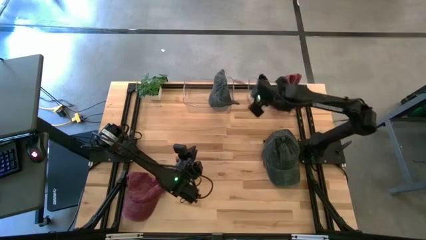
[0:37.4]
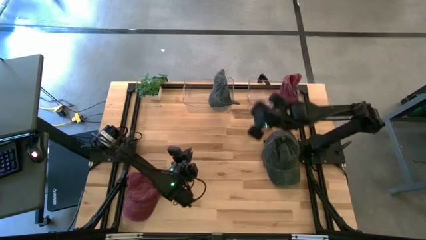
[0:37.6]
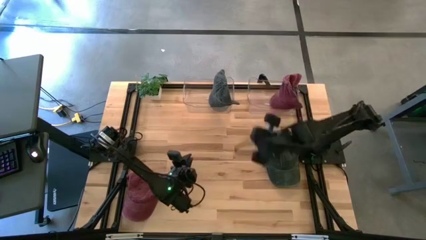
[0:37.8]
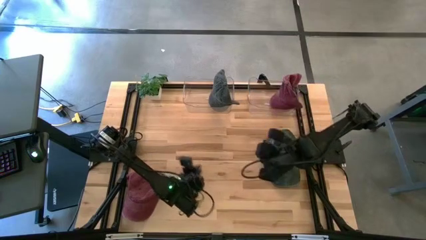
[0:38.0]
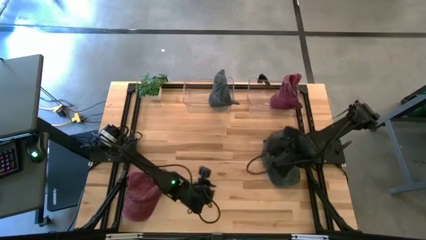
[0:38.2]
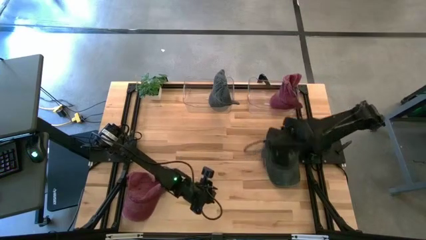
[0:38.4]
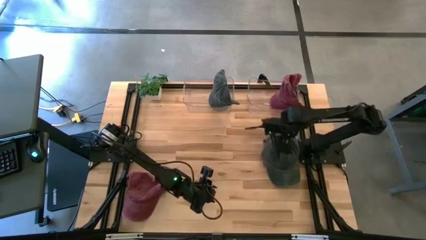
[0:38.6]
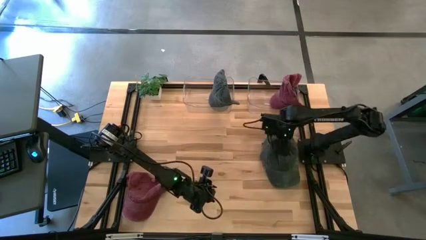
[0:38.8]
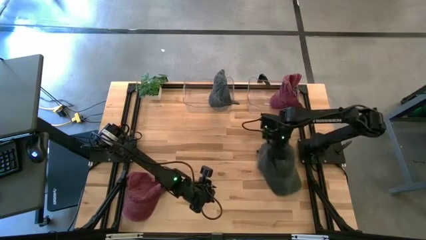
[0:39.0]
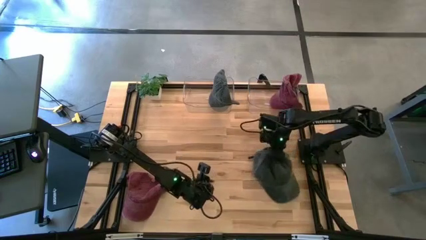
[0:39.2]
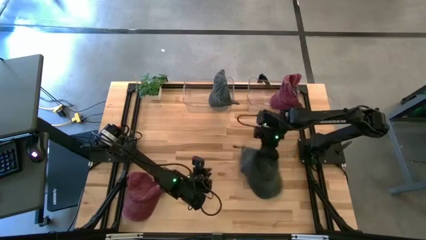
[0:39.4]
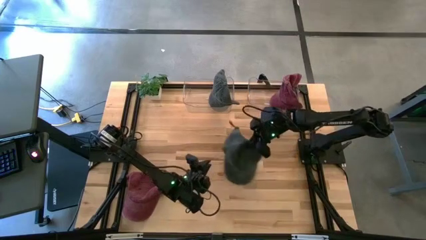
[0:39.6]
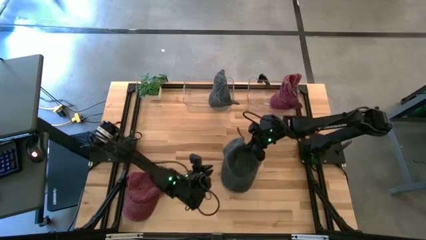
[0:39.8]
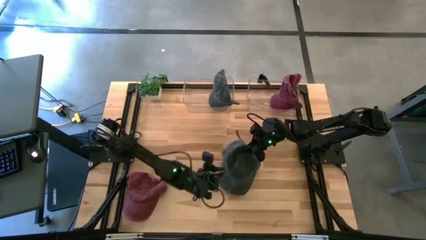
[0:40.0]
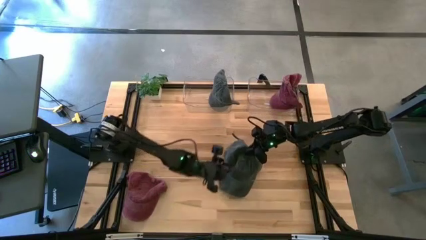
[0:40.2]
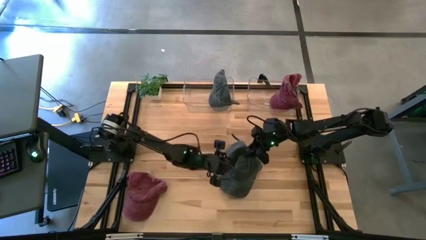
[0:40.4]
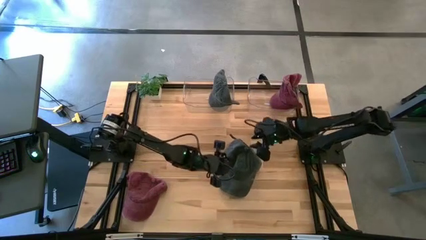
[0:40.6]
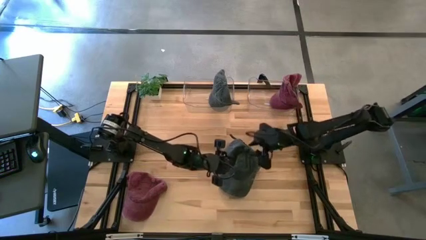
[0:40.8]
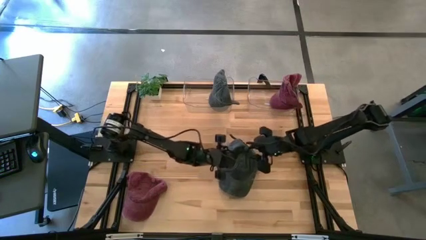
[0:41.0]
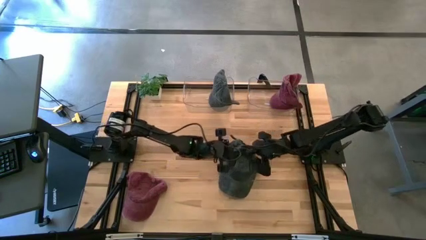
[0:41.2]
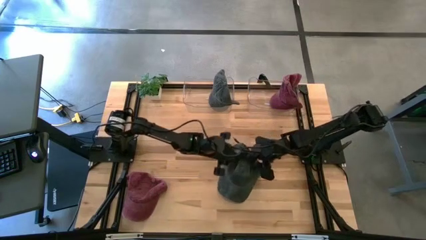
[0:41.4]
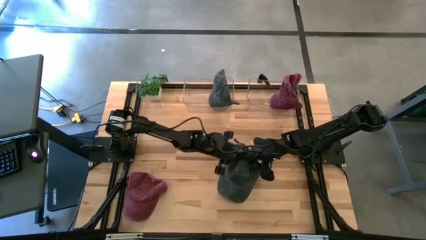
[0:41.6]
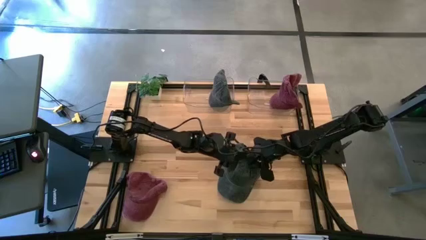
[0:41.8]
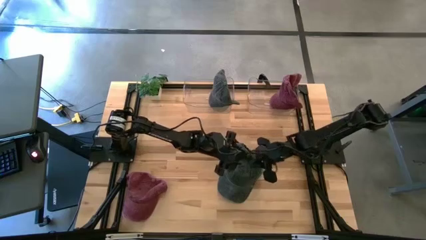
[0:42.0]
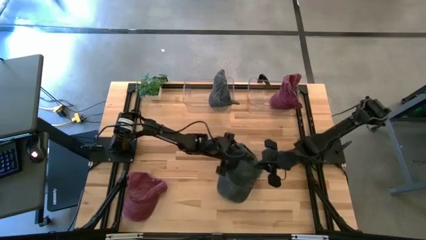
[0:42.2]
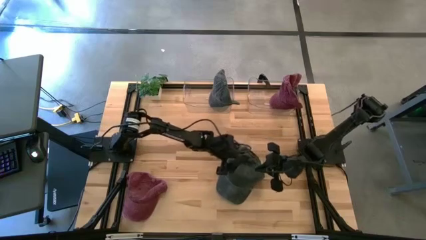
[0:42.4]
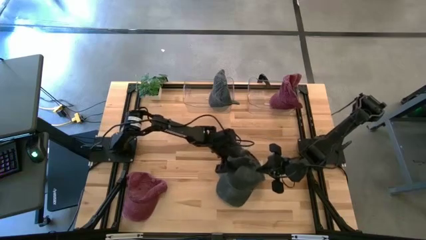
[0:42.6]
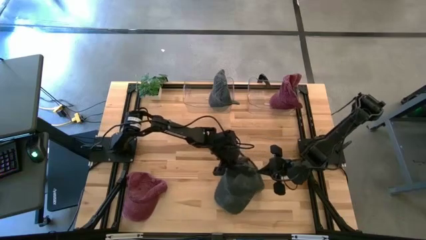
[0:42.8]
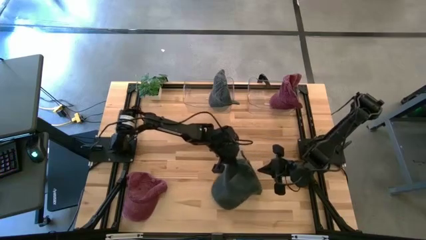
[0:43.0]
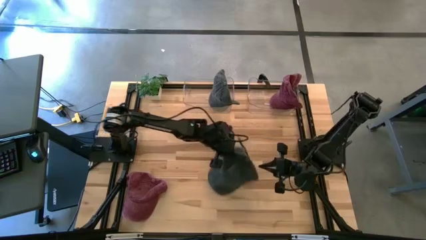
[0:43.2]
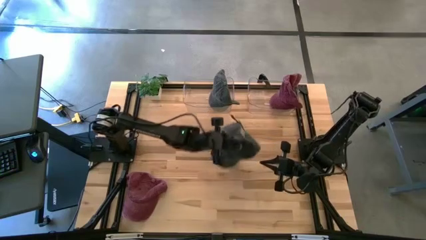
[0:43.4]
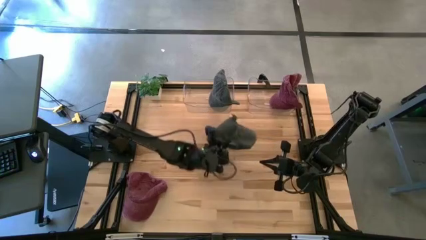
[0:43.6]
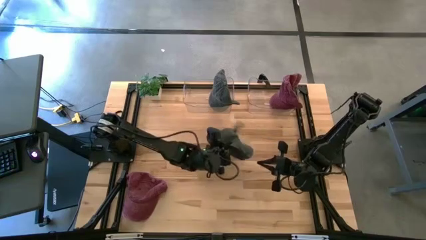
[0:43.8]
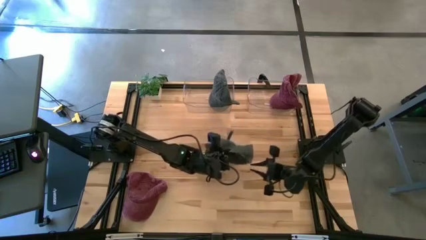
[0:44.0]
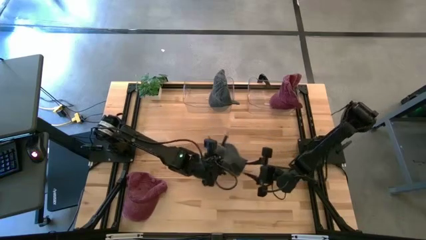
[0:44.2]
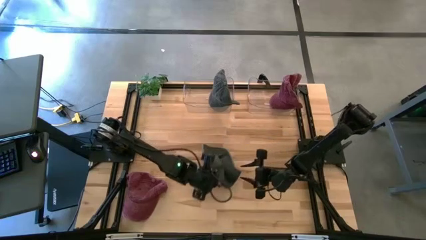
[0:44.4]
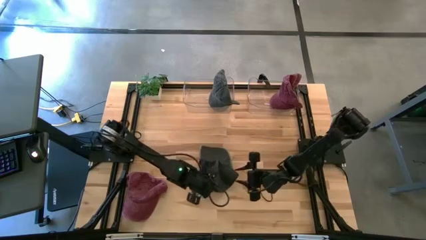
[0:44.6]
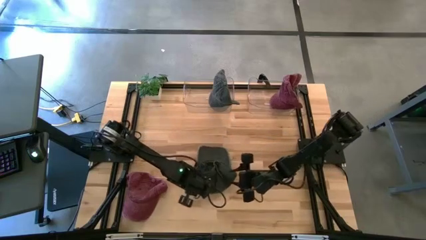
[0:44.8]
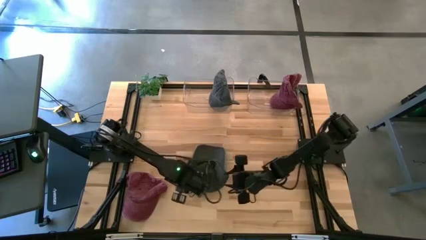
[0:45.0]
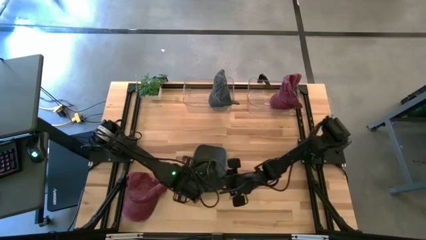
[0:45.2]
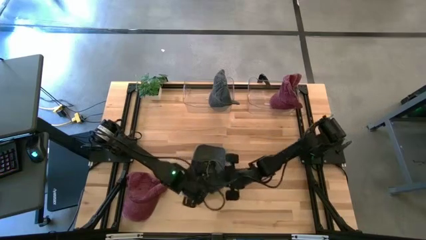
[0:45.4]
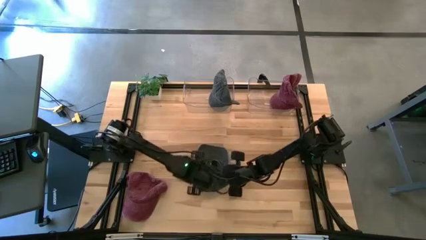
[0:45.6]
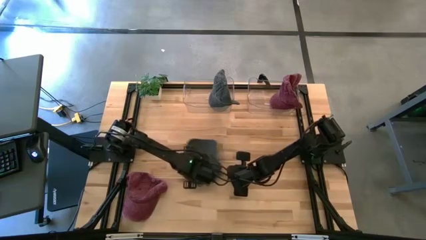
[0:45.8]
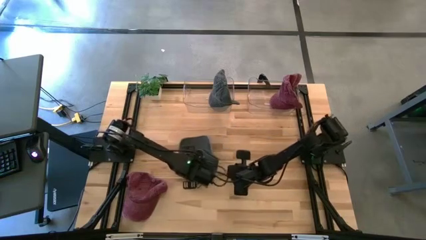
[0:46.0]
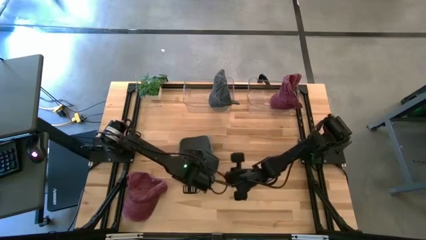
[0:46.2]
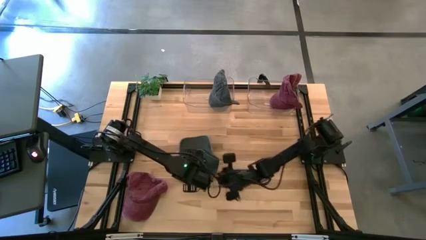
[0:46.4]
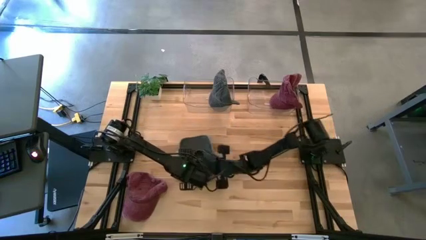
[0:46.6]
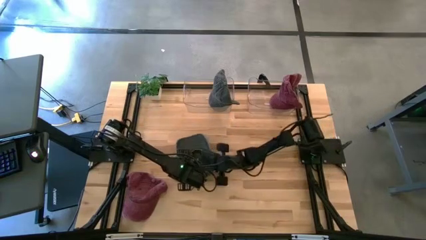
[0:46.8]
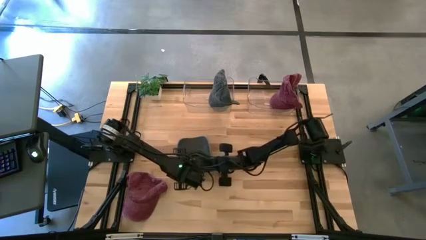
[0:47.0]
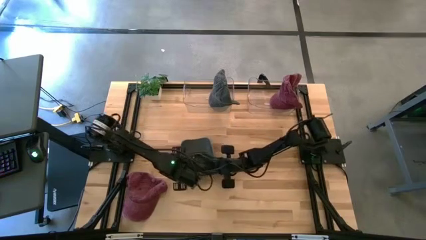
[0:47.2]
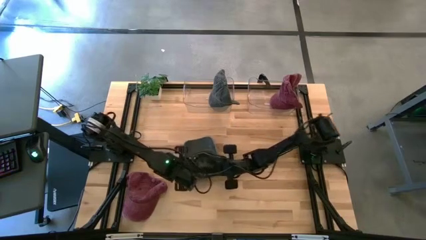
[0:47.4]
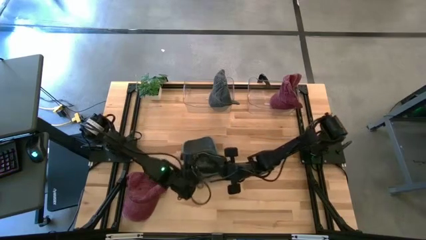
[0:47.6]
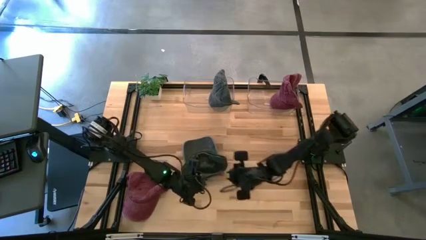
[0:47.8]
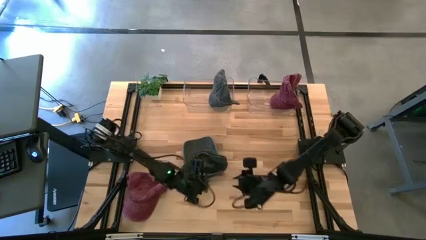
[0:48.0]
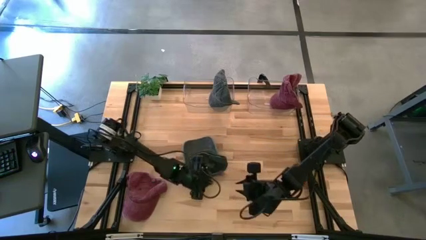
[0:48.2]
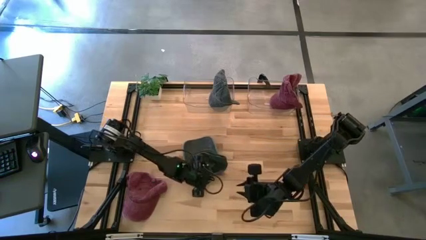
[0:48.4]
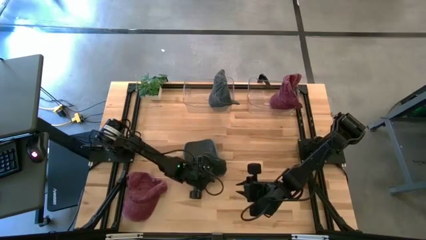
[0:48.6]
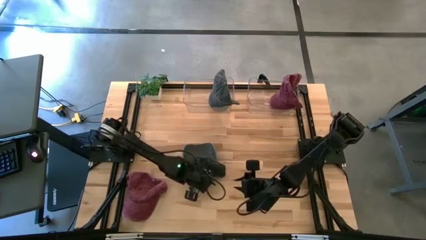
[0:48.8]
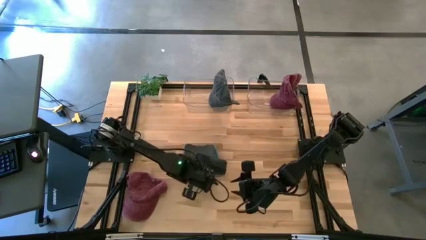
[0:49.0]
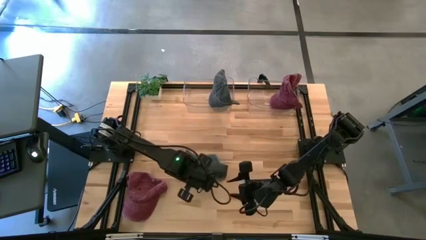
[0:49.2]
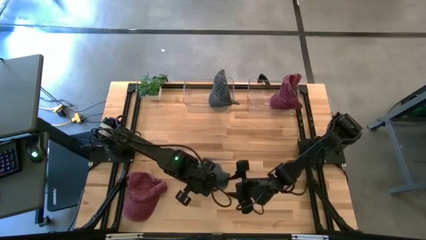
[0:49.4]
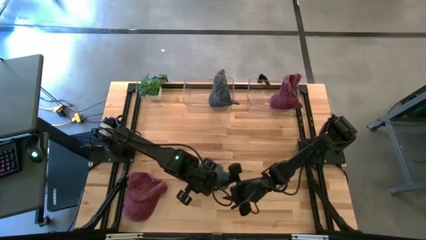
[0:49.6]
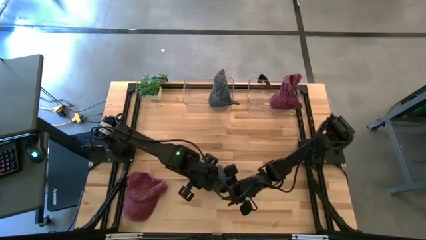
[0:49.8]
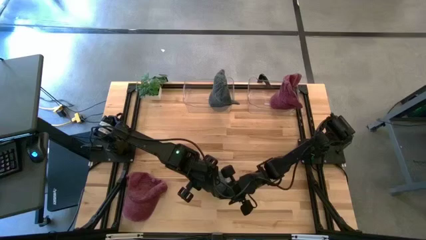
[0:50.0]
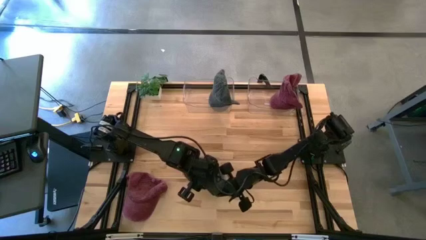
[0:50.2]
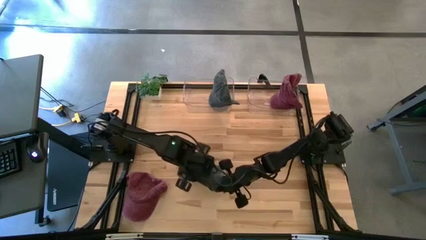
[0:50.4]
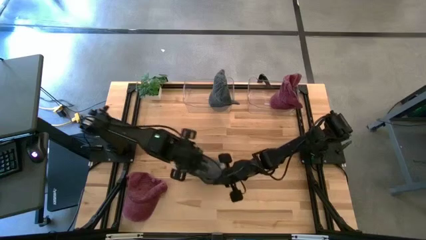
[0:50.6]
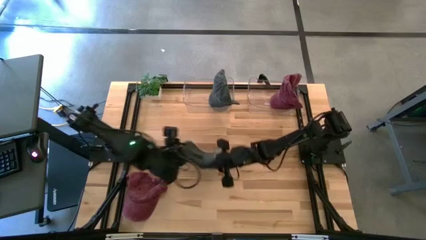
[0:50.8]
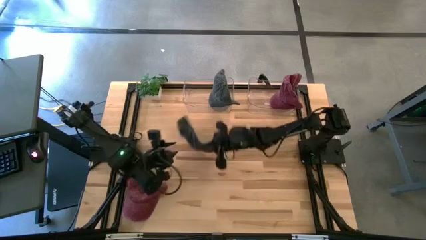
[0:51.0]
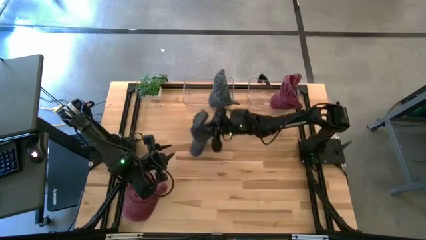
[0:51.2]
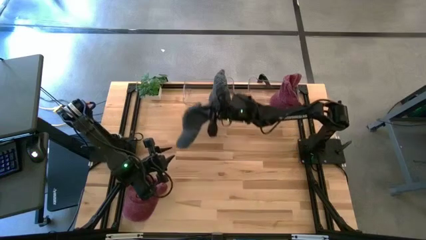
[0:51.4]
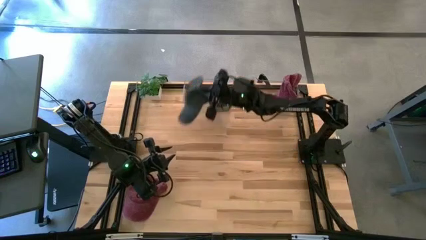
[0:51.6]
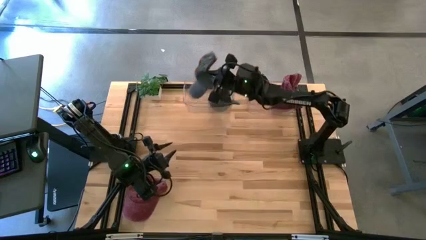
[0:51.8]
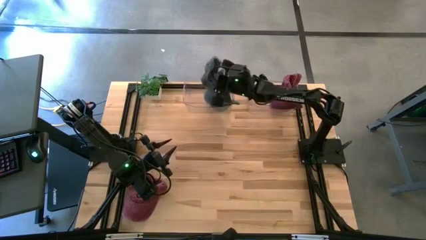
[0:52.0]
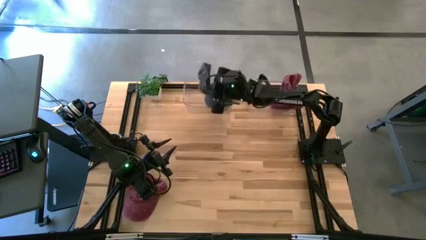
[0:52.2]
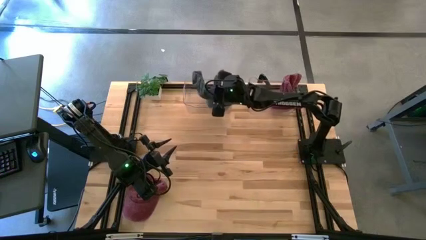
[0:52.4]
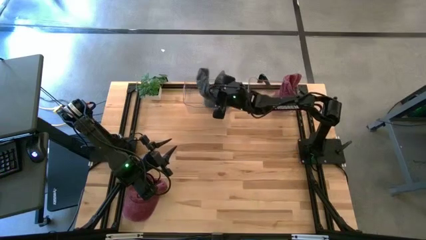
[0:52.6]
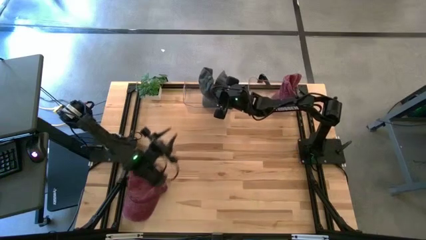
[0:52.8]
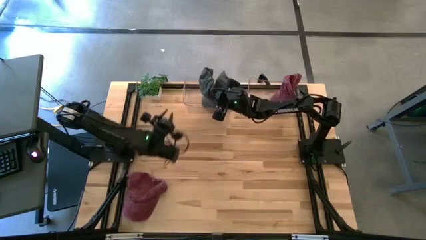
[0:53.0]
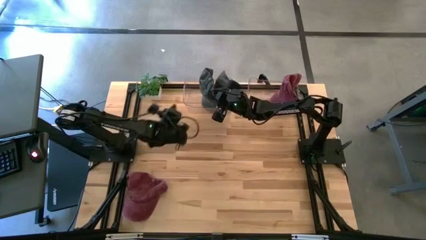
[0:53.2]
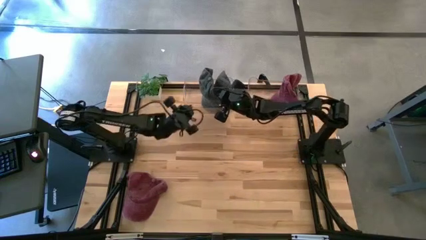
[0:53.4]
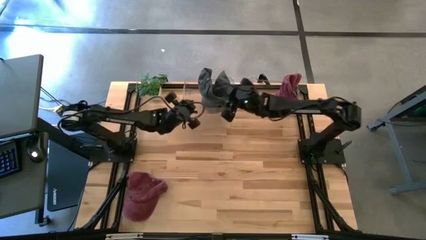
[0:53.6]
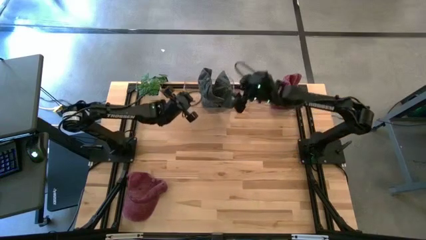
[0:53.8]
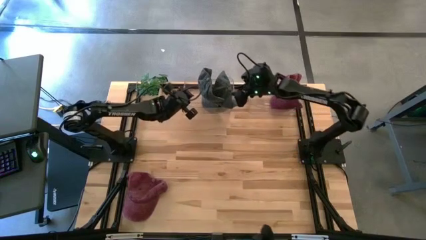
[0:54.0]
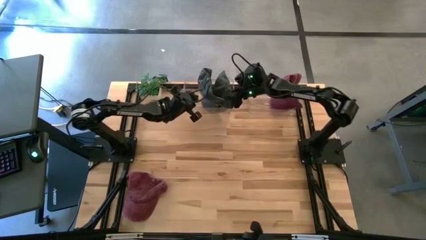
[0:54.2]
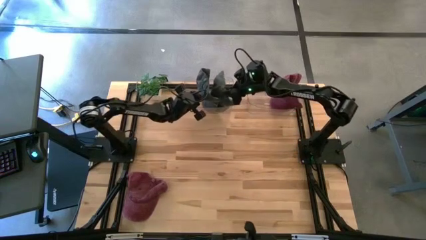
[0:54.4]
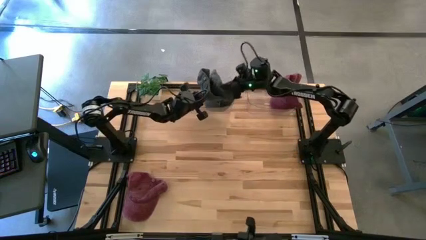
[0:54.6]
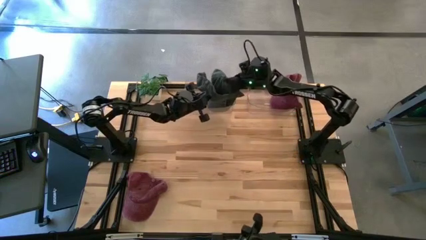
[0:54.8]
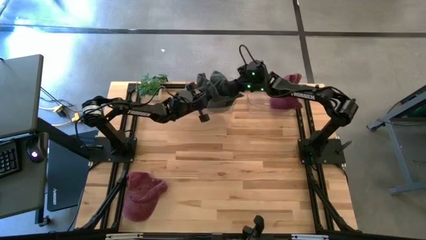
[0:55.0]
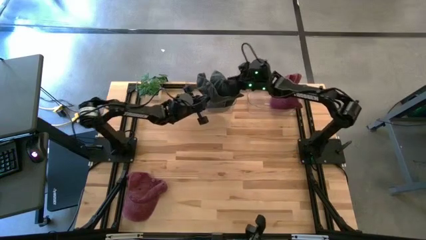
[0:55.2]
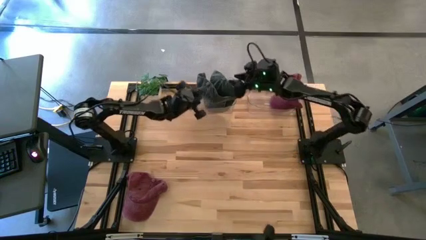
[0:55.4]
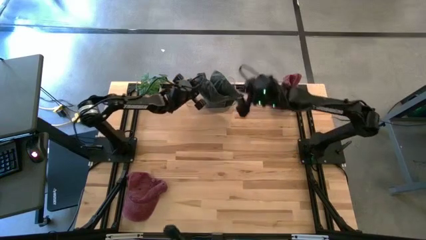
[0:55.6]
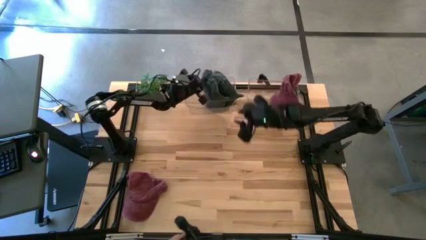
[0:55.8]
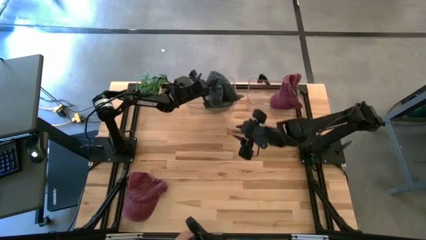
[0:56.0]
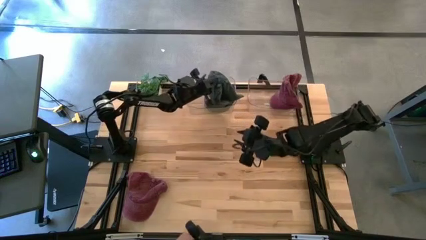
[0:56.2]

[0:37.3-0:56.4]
Task: Pick & Place hat
Put the black cap into the left transparent bin
